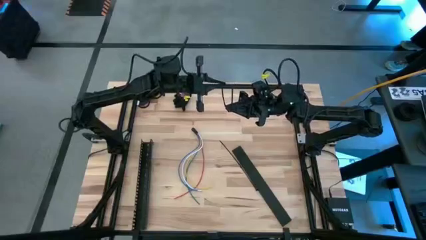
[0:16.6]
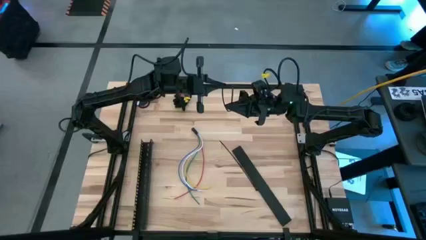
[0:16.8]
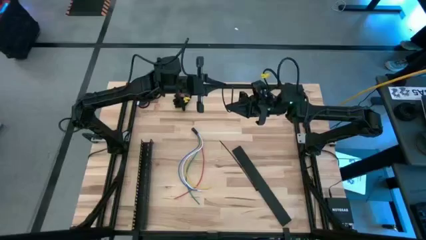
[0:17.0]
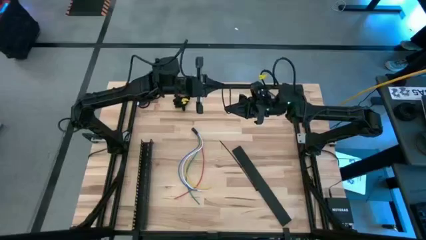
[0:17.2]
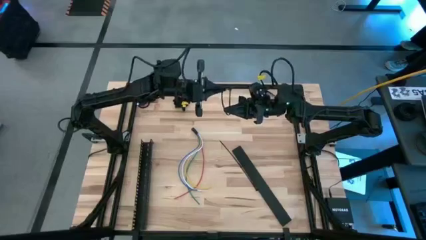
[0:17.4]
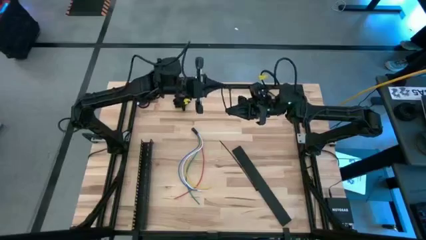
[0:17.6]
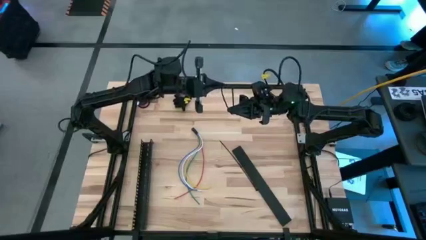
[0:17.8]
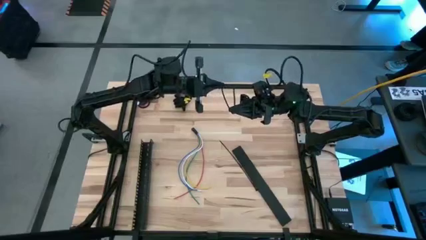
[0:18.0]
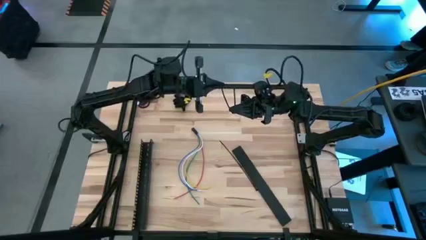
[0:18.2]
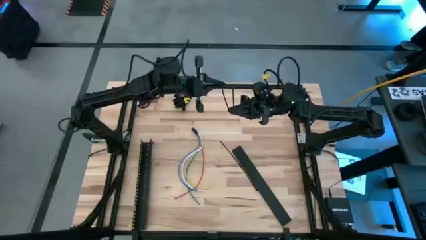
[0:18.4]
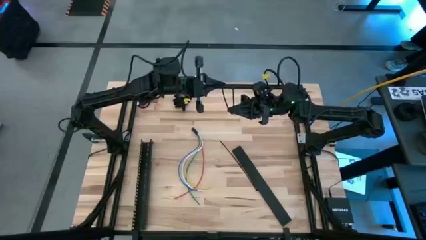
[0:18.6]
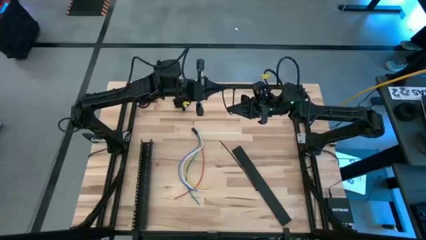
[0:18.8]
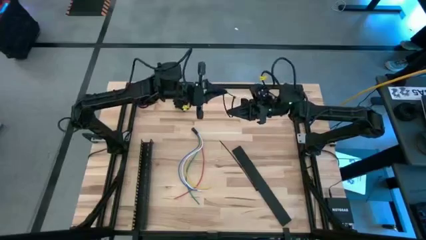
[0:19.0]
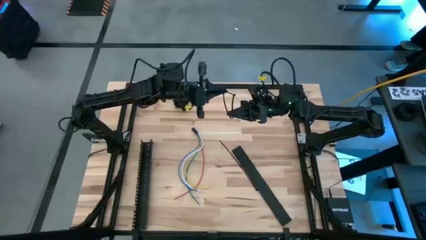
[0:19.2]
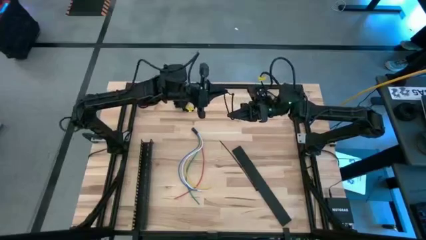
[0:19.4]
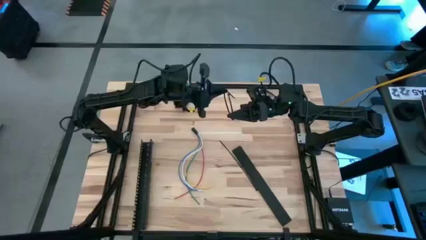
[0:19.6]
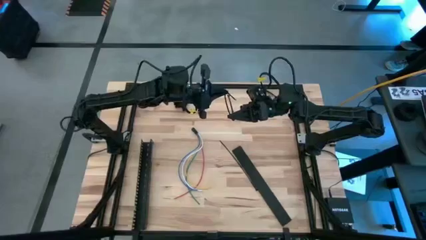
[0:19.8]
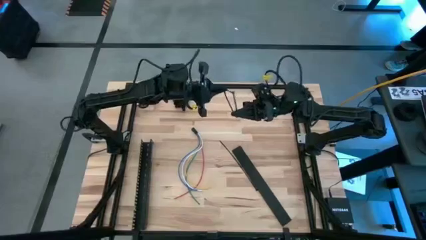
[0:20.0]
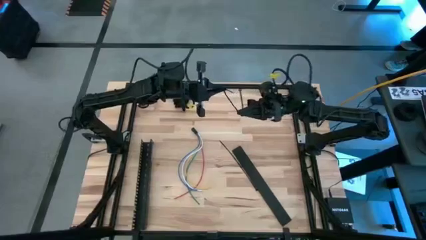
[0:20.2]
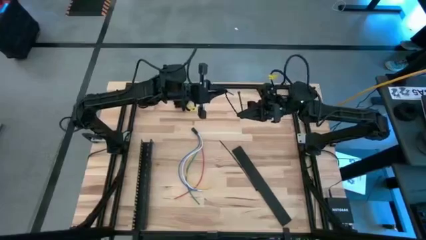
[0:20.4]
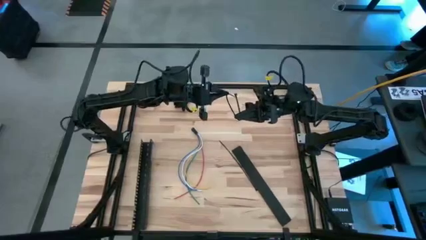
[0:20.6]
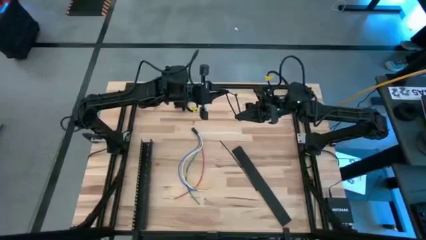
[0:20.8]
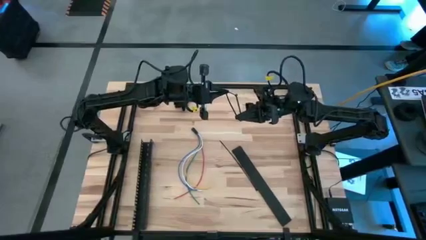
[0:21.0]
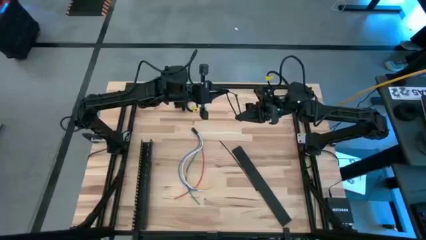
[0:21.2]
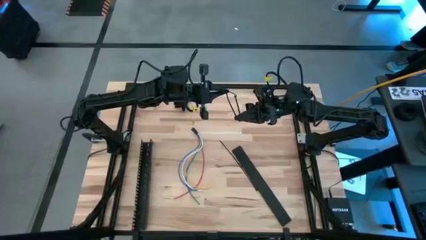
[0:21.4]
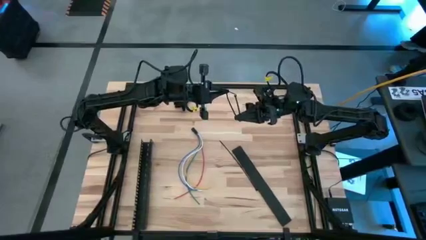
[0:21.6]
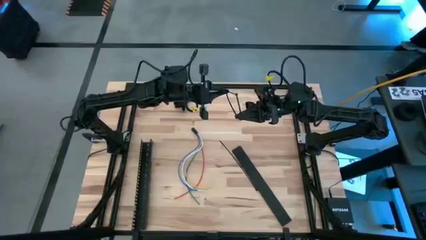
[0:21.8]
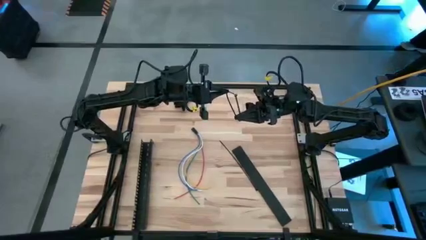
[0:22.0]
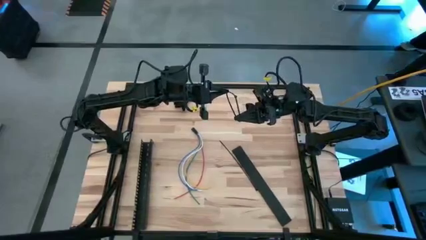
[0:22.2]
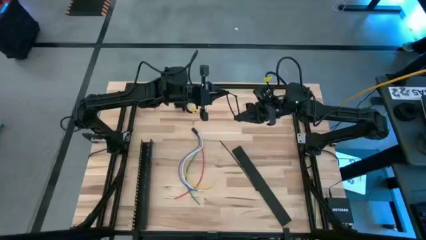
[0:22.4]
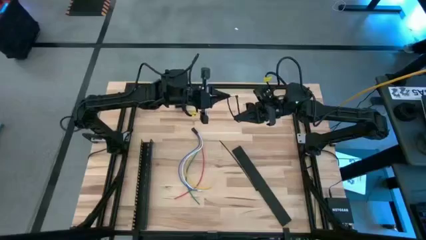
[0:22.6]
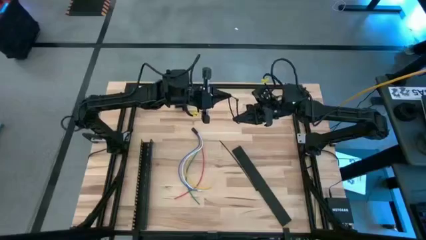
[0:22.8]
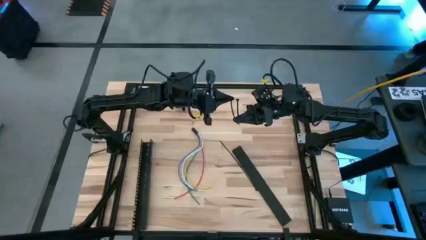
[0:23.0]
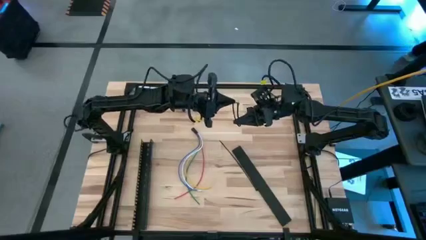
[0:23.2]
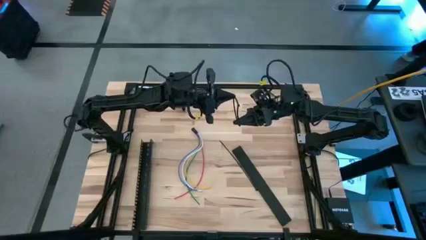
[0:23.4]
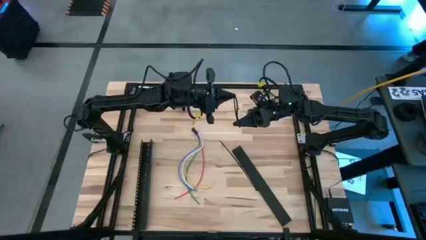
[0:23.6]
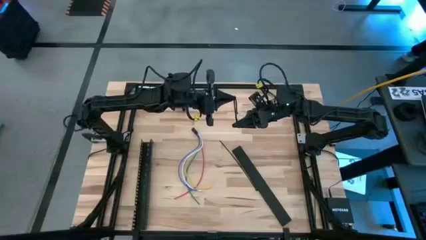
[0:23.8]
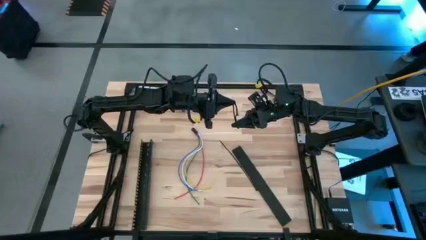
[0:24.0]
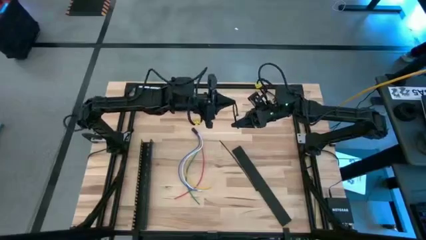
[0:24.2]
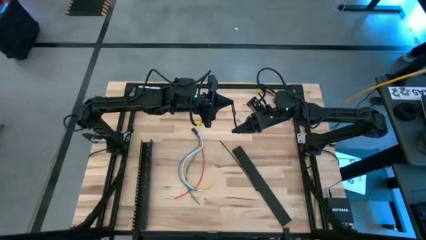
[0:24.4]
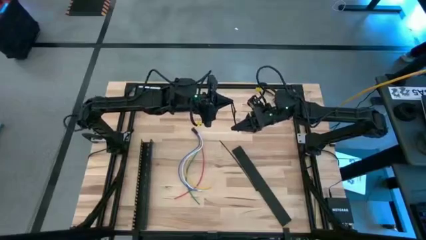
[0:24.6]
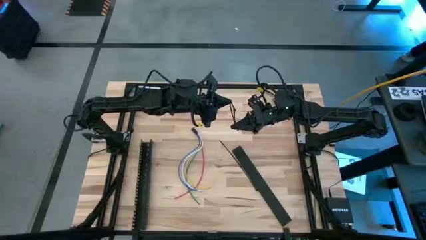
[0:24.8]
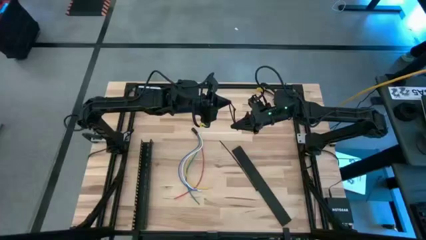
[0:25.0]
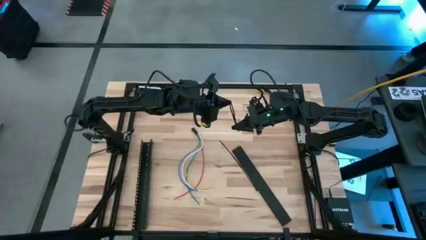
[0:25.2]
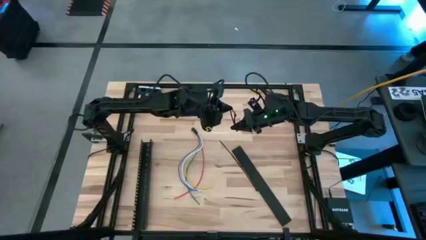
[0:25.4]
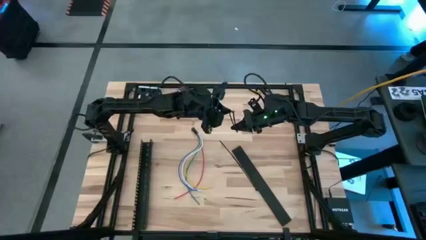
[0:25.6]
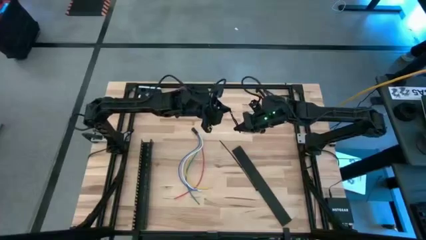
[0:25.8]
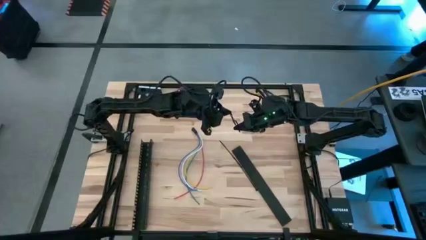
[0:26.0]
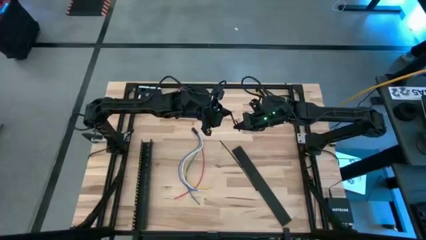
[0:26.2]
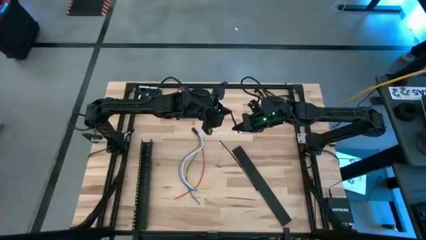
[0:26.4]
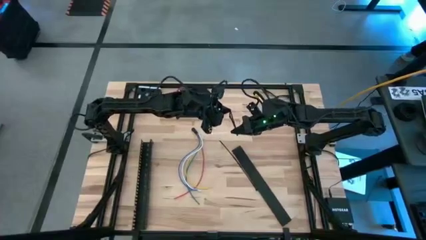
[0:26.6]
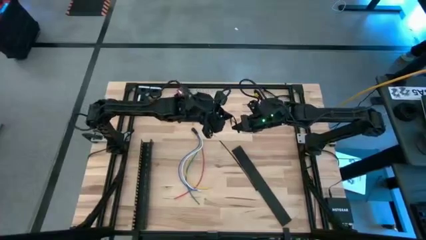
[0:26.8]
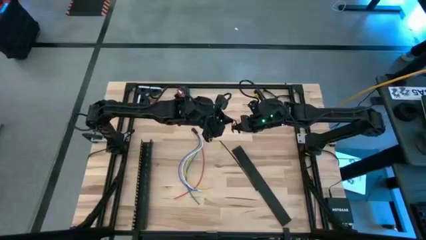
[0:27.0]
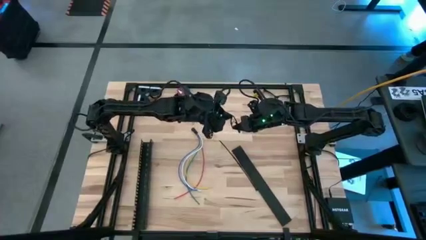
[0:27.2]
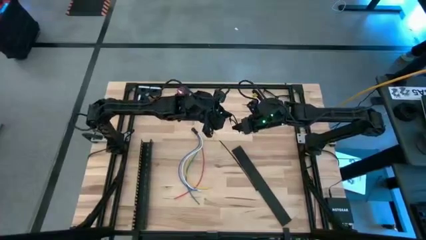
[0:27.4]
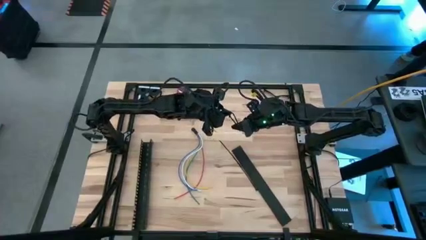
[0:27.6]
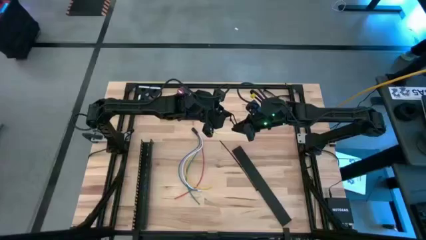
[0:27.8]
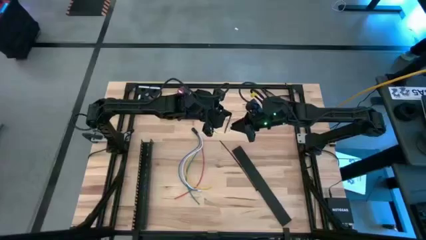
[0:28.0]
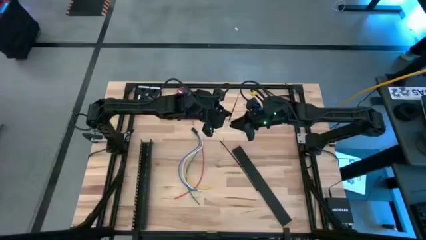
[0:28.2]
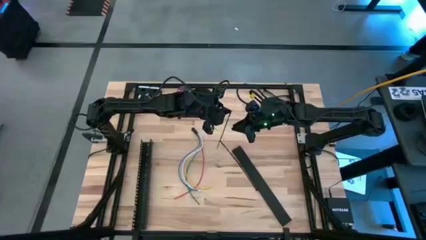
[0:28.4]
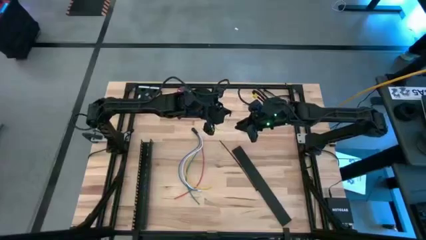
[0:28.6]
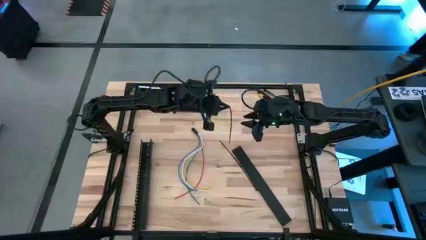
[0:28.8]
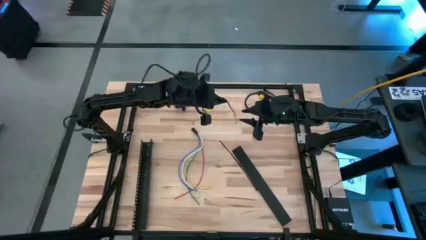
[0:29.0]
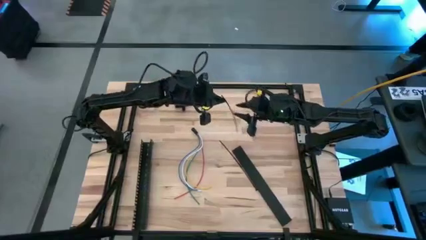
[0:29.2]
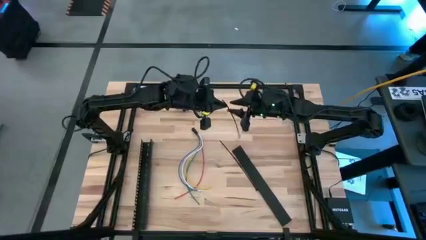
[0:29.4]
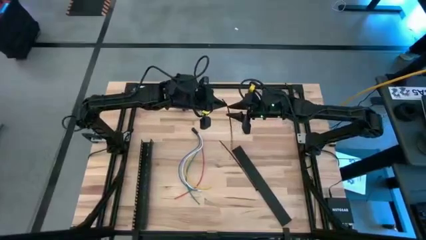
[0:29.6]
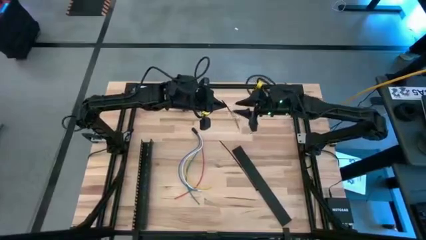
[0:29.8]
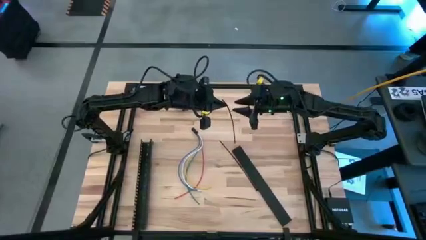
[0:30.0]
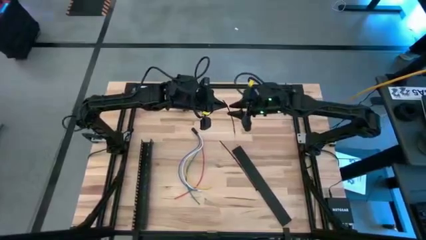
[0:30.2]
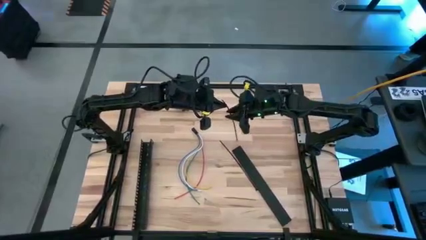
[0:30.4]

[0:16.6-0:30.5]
Task: Ziptie cables
Insert the left black zip tie tail into the locking head
